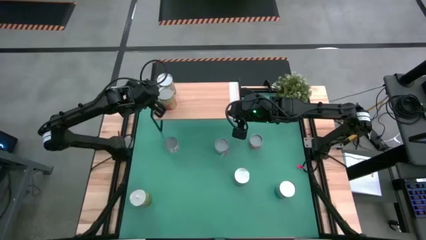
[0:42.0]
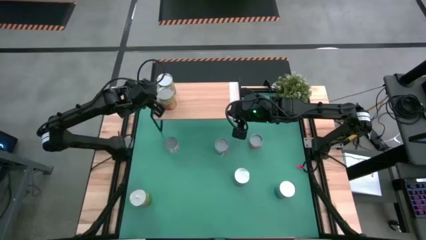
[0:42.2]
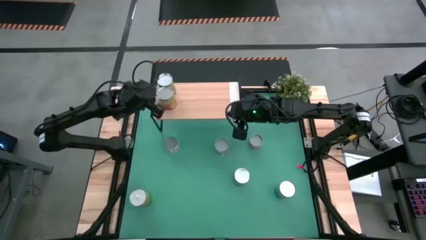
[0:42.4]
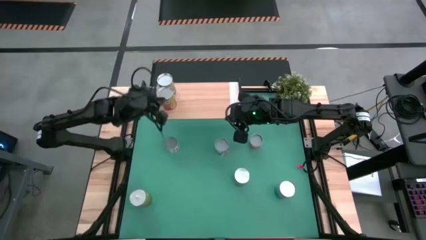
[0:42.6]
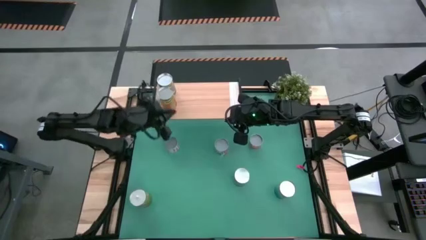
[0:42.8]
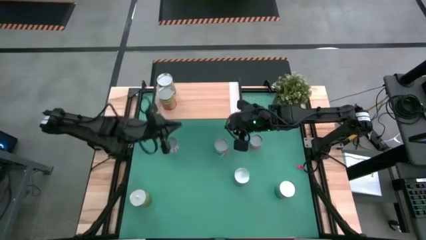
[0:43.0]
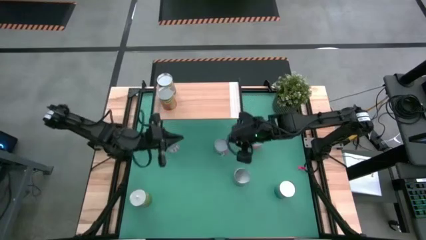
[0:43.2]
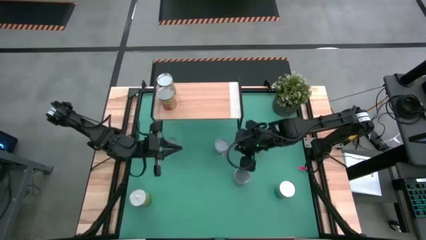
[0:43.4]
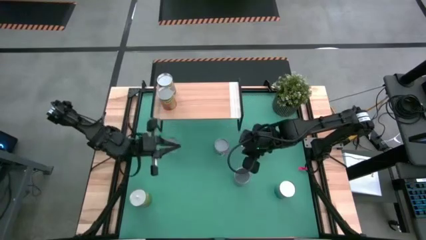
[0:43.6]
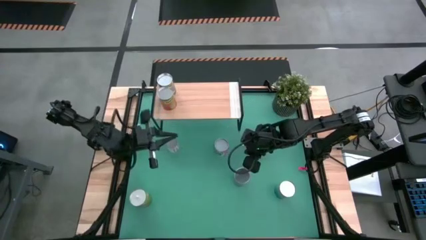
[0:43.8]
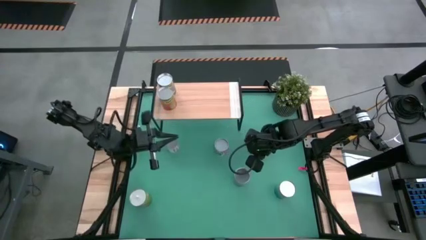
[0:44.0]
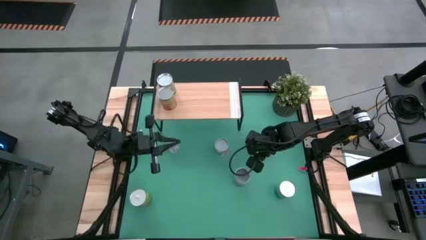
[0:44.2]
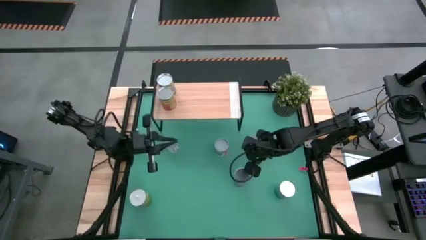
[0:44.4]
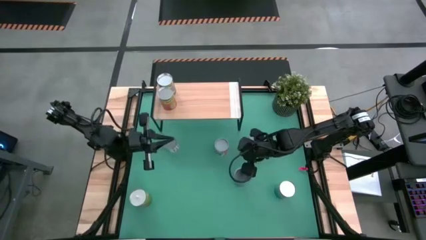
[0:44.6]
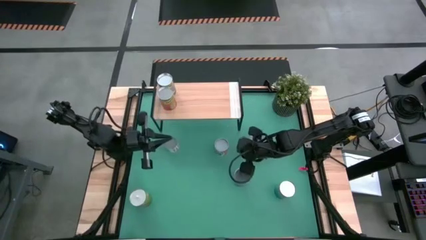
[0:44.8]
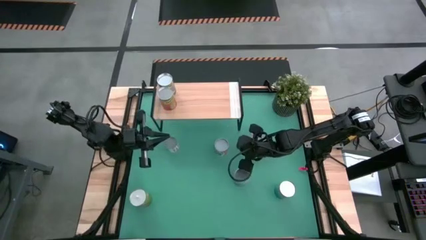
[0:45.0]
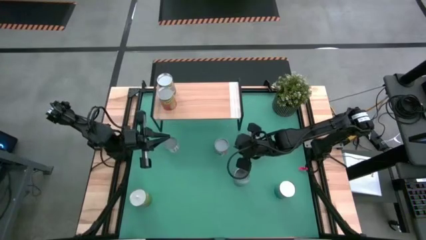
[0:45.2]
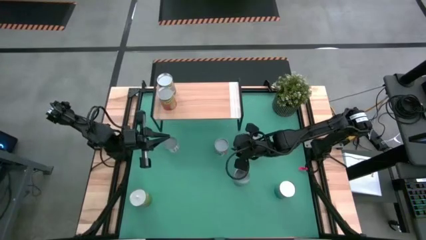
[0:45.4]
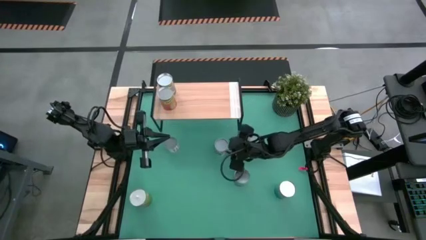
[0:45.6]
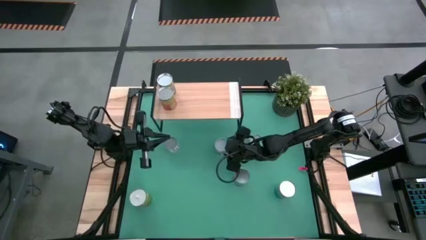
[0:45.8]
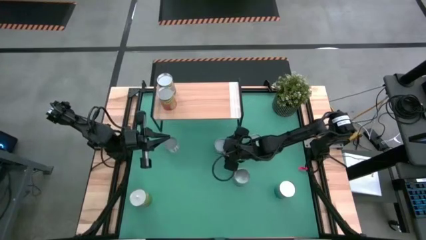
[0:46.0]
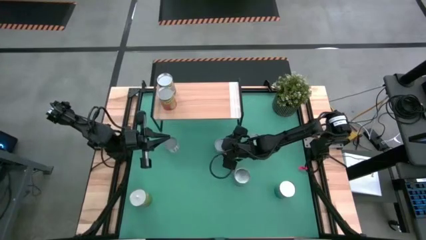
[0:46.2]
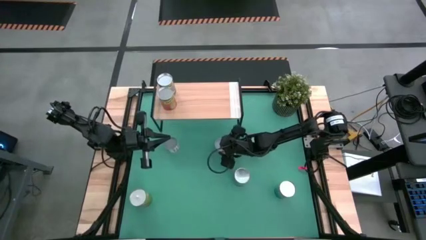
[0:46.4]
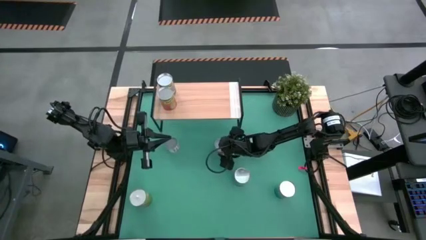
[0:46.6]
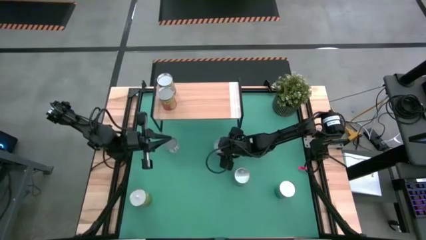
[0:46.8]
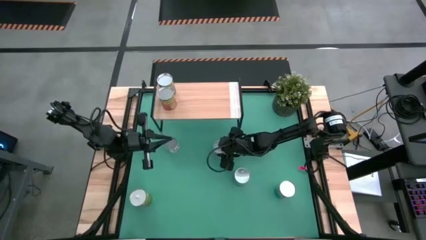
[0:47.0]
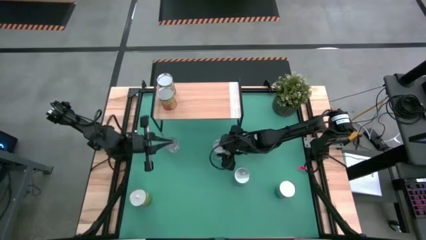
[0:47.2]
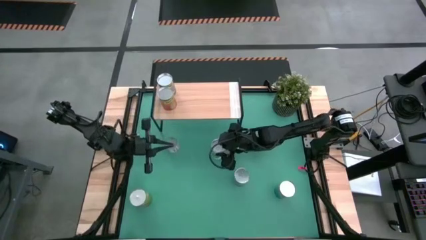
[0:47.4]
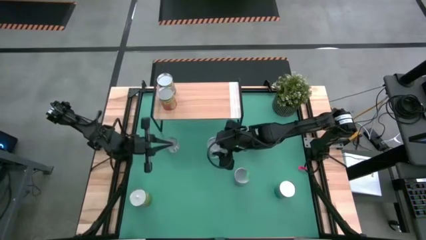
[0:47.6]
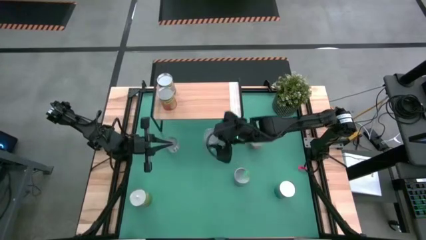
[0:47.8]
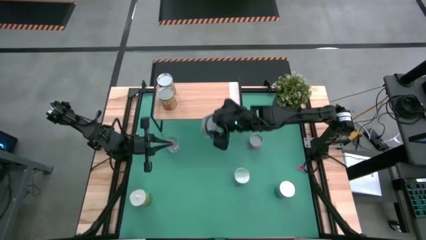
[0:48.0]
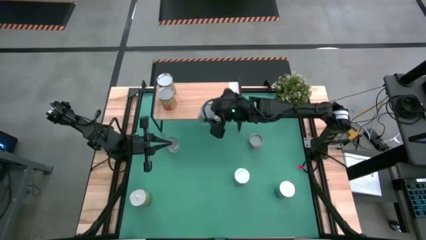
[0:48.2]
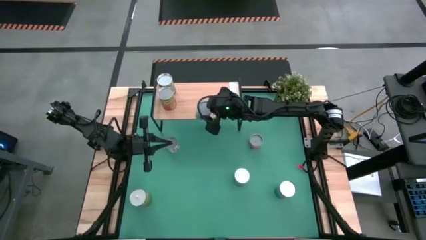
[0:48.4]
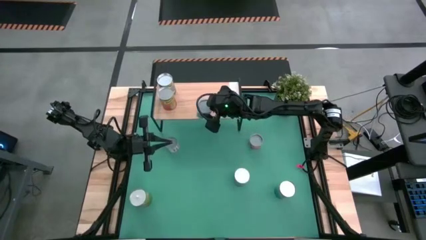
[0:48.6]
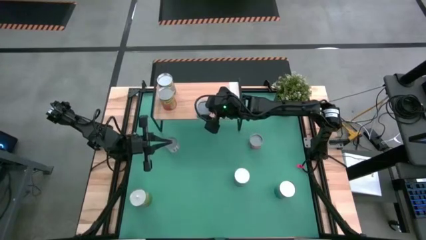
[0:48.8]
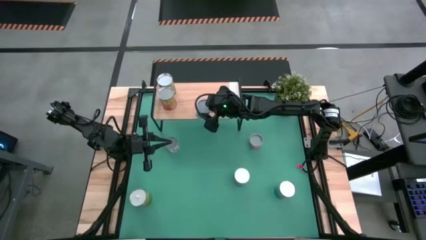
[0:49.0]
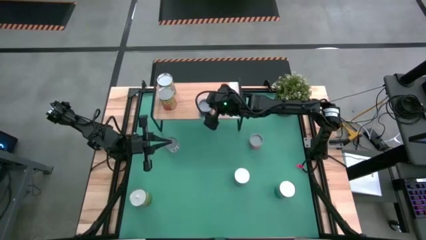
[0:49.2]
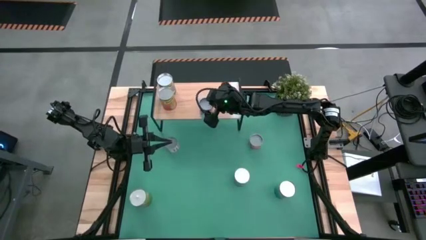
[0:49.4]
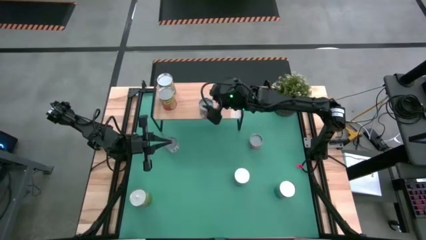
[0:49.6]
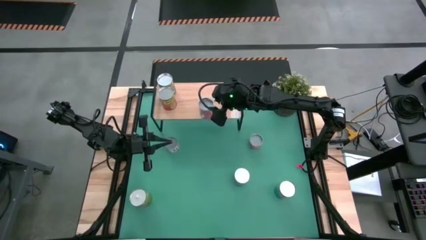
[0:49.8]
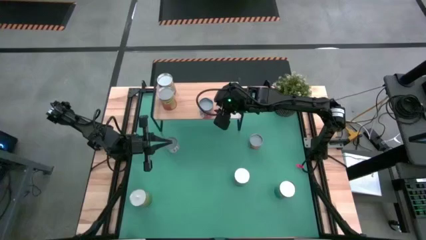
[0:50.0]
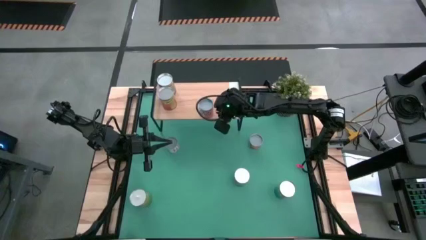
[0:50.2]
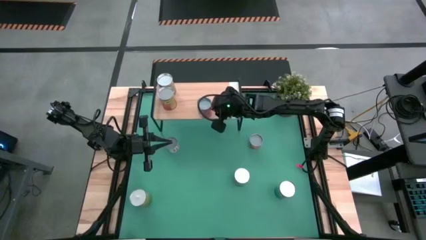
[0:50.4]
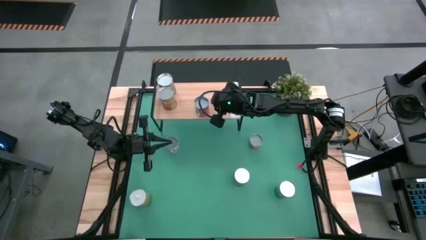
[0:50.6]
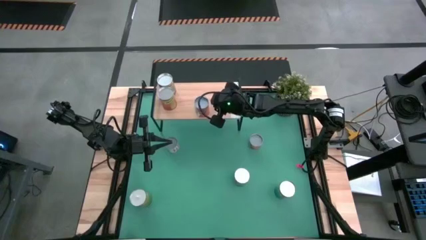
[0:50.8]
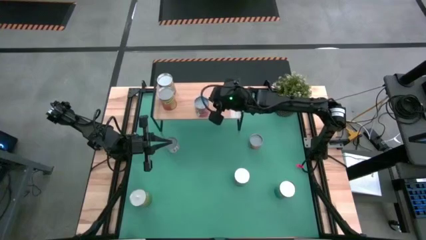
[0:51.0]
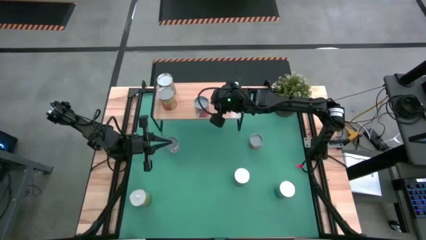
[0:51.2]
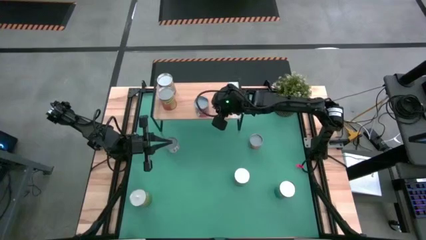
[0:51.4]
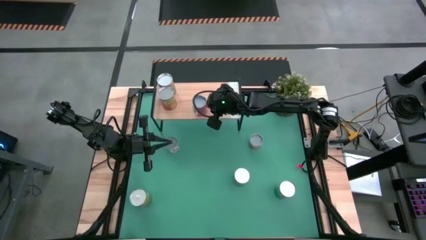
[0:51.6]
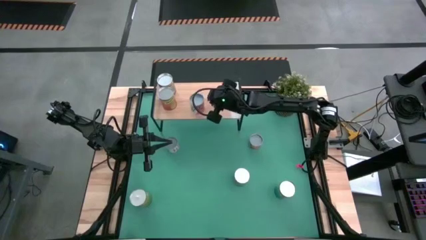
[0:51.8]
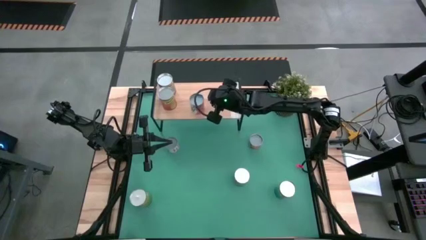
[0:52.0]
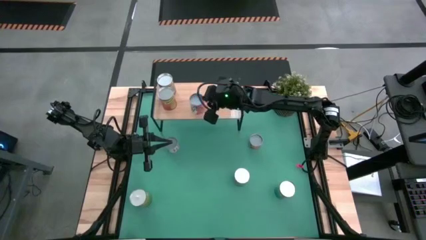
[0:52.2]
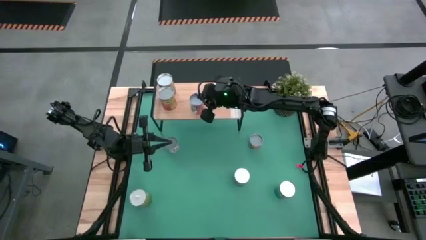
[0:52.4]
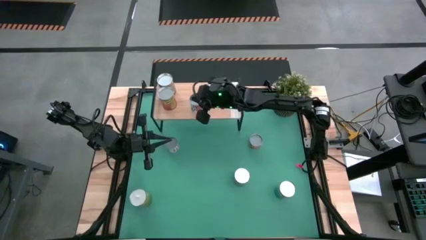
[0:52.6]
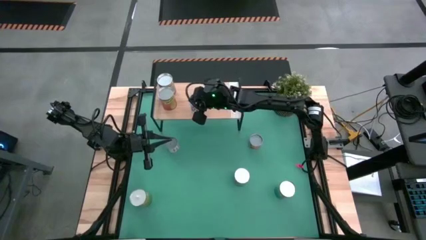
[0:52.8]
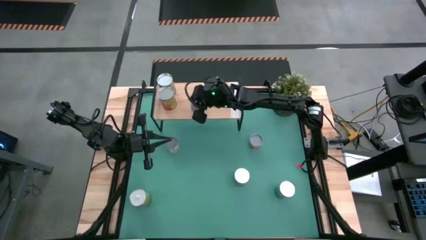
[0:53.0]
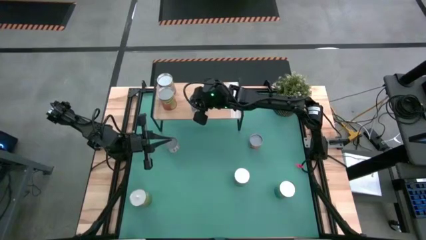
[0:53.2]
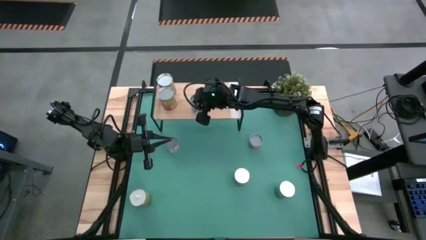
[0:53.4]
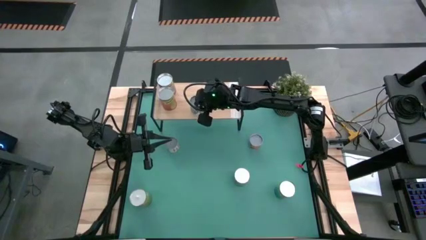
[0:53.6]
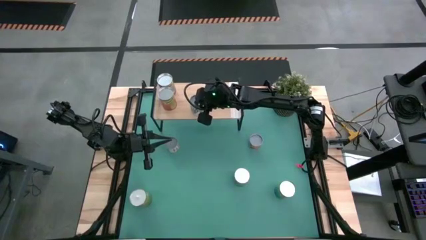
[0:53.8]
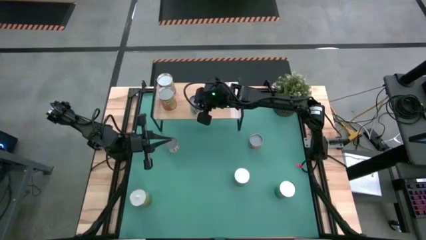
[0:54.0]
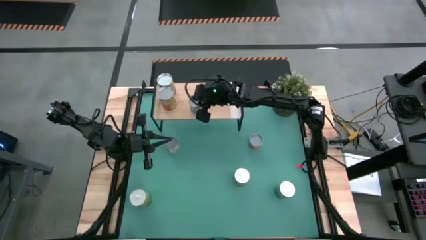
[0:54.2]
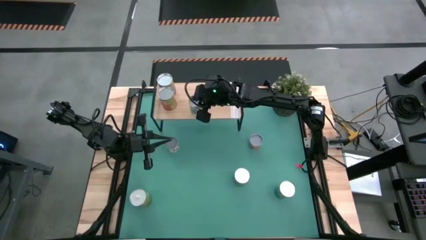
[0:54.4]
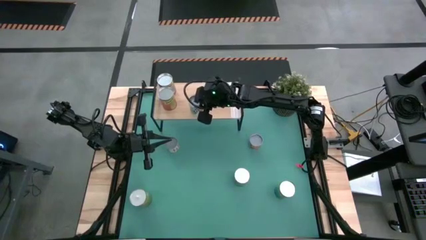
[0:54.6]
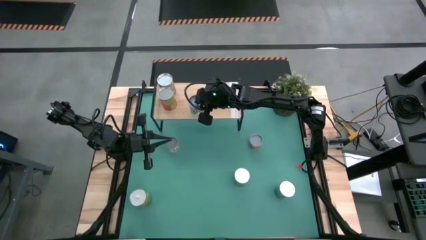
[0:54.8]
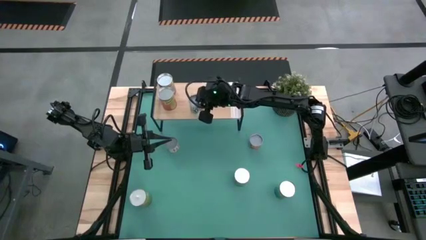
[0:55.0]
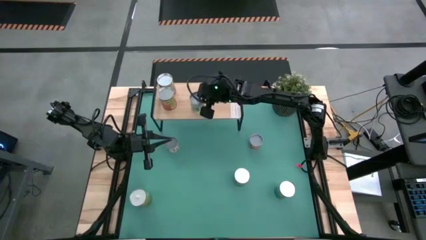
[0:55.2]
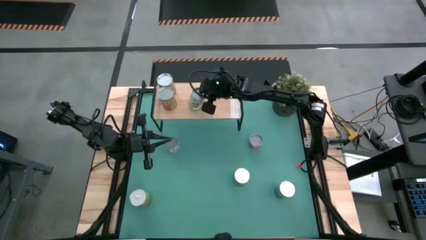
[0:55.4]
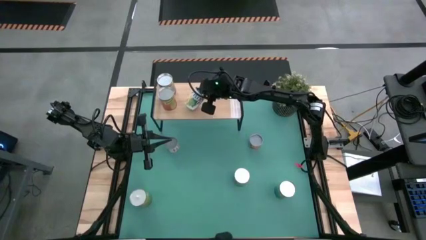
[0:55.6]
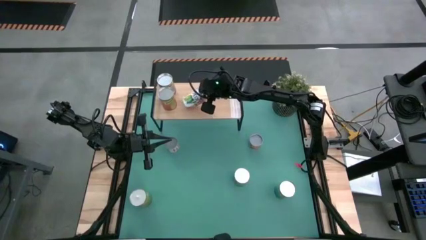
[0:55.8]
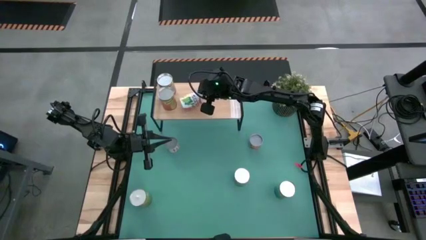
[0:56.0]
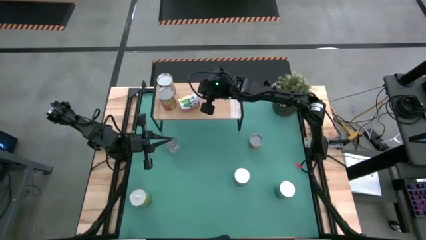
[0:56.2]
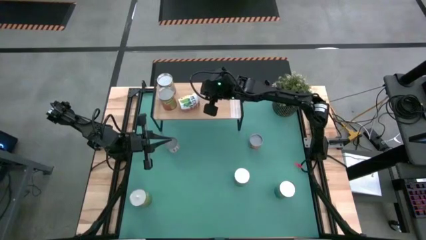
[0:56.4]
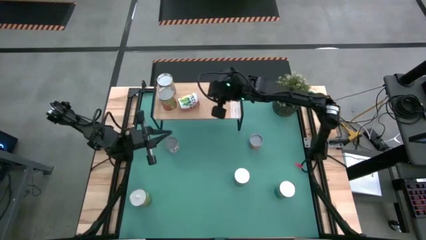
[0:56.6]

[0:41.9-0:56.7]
Task: Pick and place cans onto a shelf
Put the canned mixed fruit on the shelf
